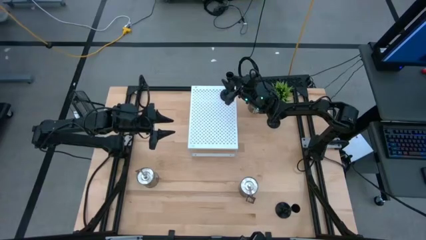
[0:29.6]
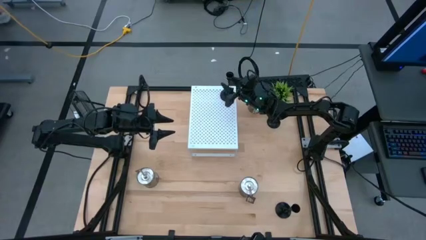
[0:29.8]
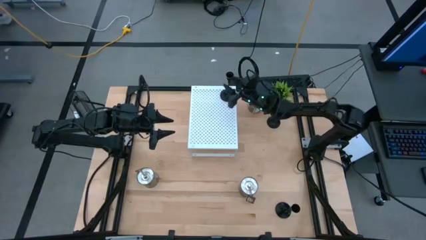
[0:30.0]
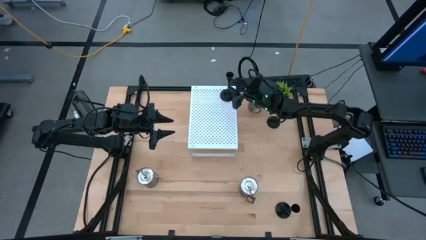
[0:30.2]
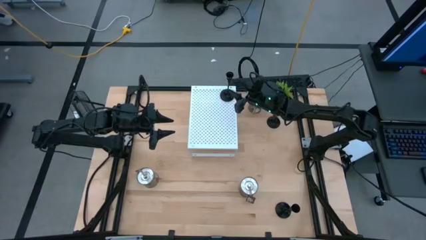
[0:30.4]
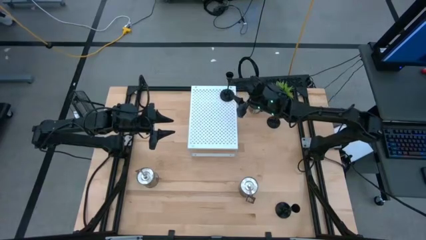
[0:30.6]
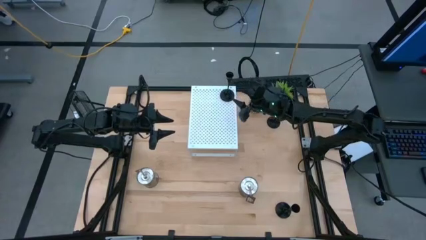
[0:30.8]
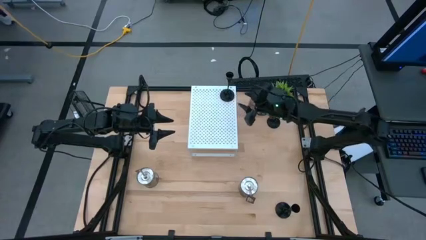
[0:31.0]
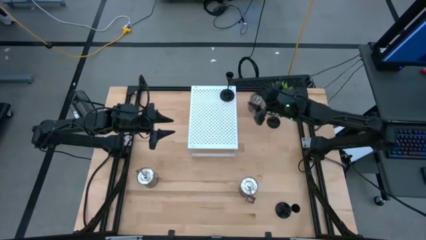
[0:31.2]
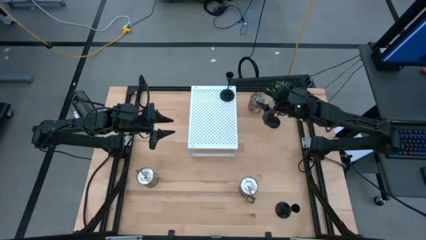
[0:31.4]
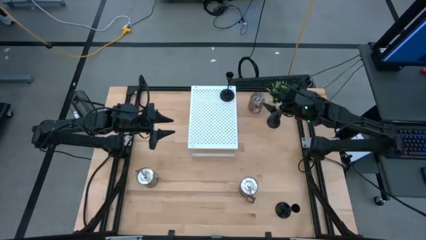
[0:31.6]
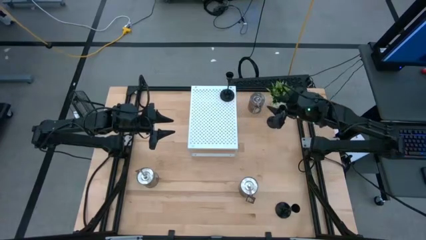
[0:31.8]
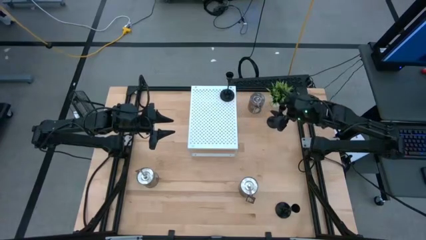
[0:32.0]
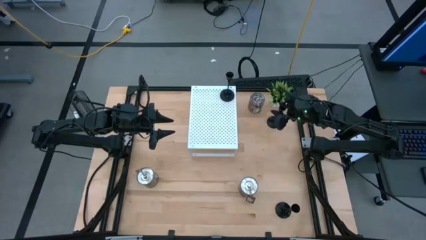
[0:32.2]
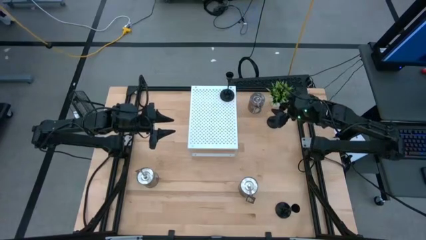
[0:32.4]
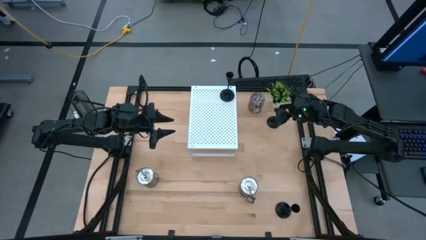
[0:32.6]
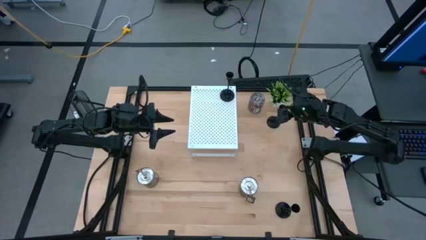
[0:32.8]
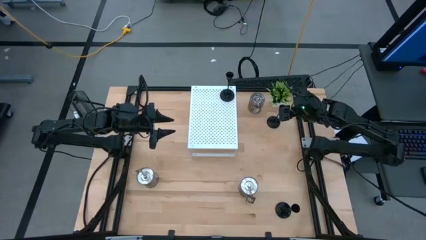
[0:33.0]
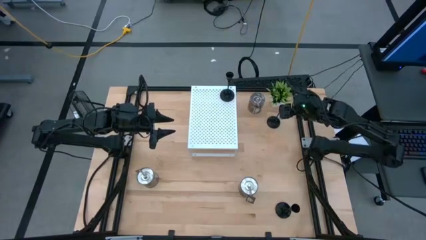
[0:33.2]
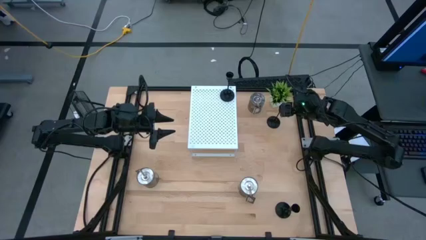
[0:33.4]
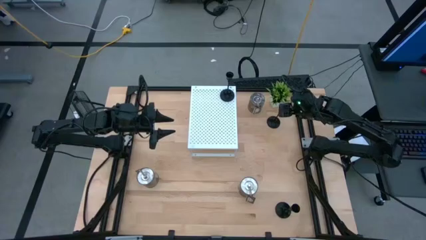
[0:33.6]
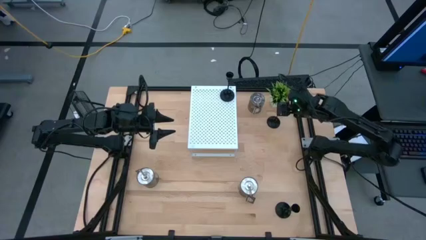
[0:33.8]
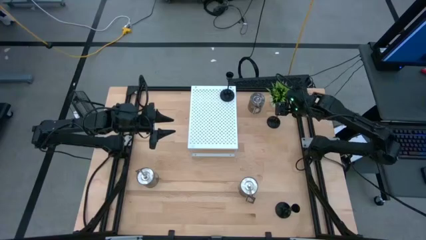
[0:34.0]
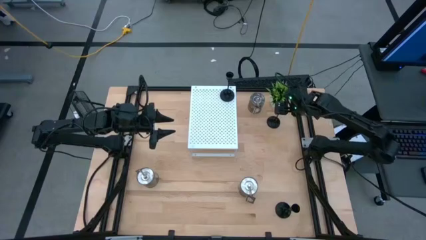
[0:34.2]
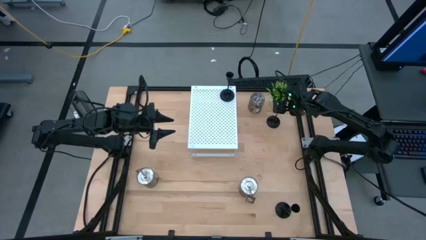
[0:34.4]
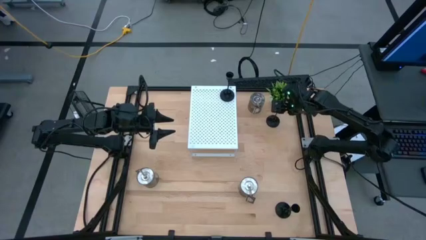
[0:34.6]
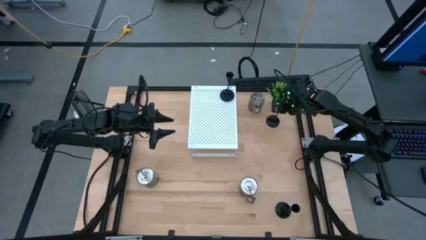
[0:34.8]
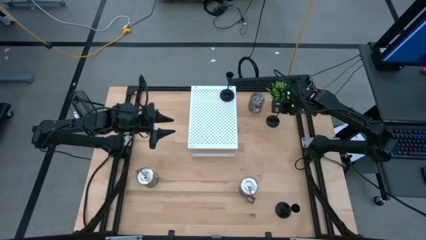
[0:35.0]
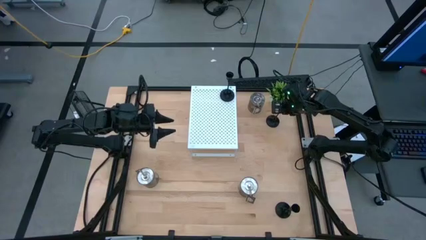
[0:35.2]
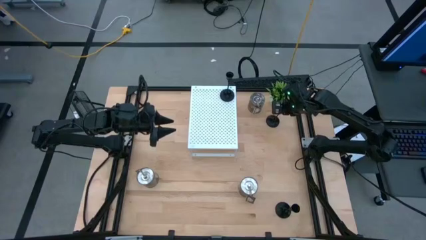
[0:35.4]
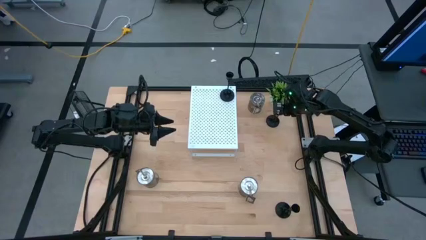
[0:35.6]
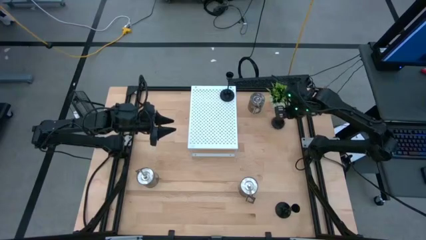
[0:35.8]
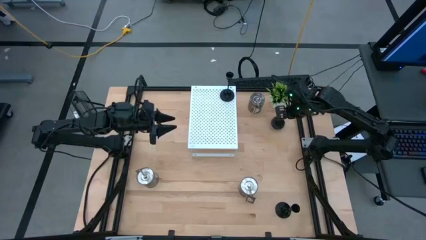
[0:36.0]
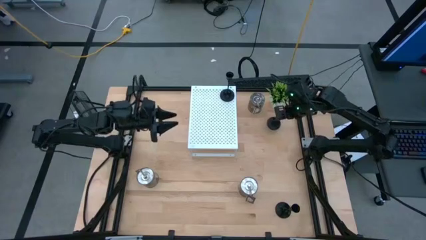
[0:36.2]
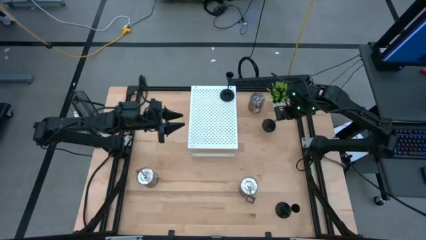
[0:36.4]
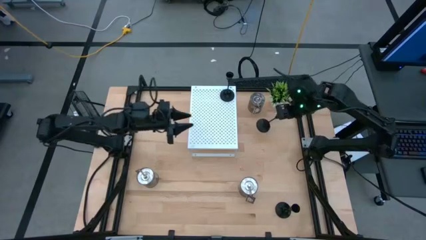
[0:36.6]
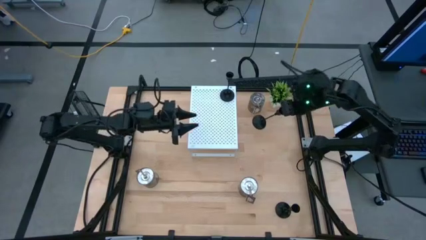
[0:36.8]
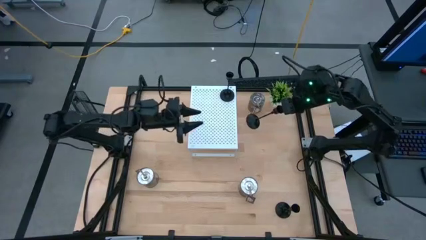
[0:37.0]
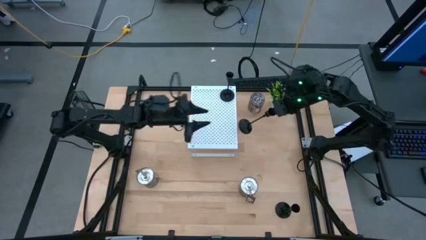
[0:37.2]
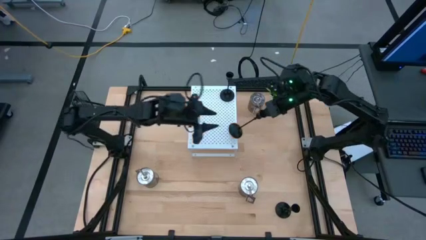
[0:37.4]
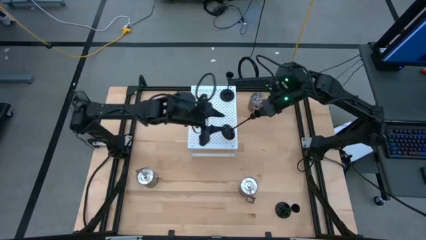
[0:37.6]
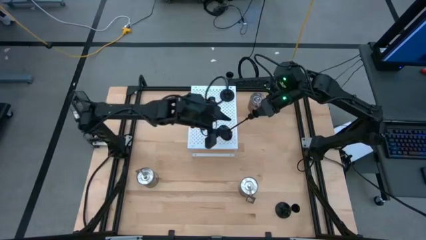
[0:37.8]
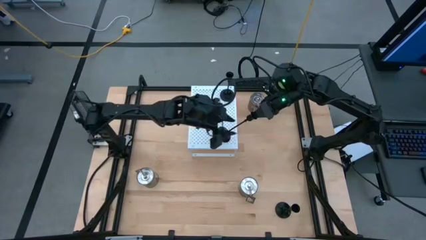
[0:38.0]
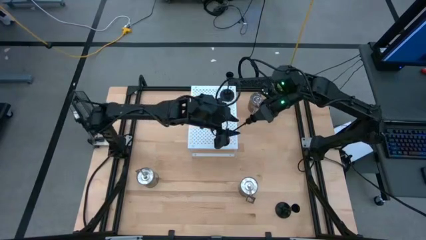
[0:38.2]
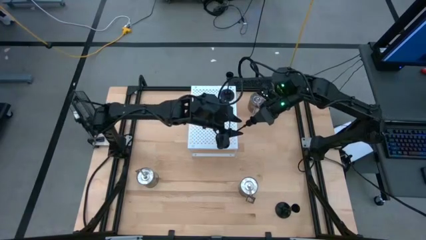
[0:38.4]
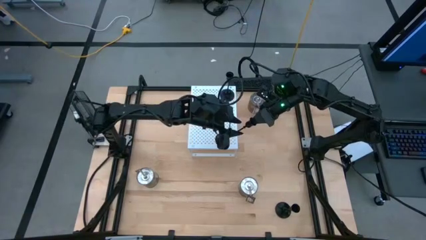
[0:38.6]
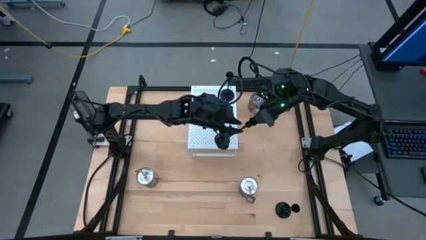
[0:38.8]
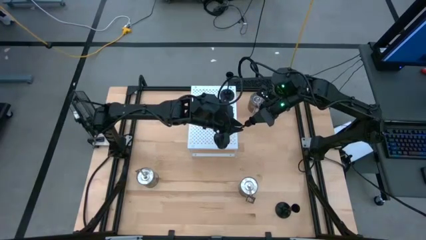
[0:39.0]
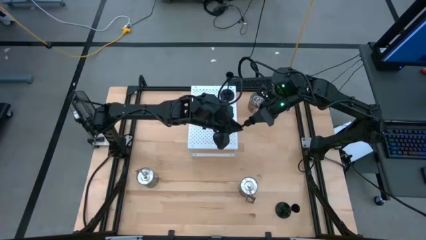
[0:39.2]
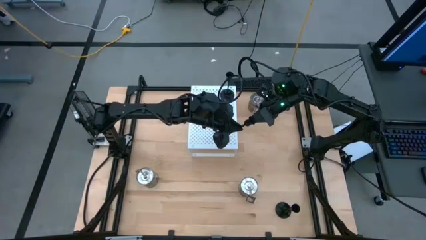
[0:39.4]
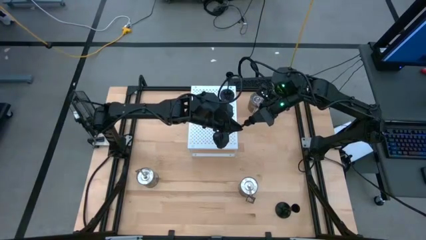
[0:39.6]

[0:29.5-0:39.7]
Task: Pick & Place candle stick holders
Put the top black candle holder on the shelf aligned with the other black candle holder

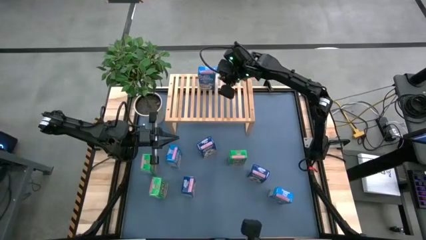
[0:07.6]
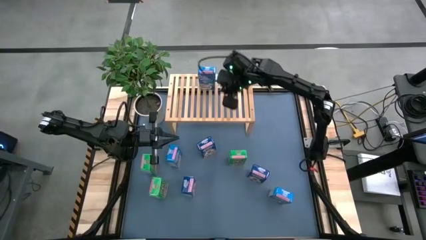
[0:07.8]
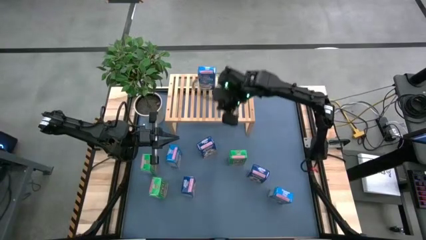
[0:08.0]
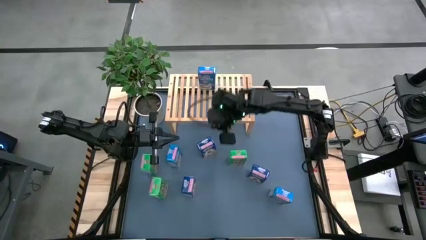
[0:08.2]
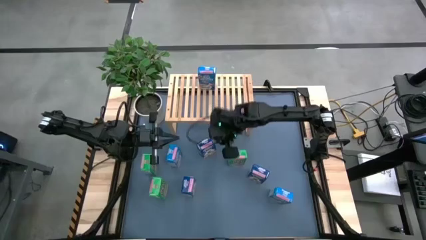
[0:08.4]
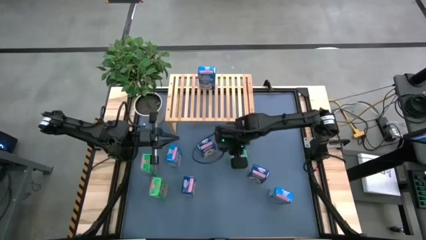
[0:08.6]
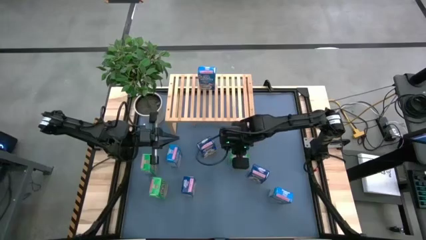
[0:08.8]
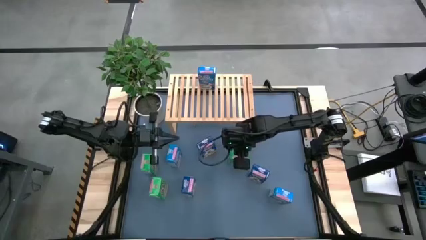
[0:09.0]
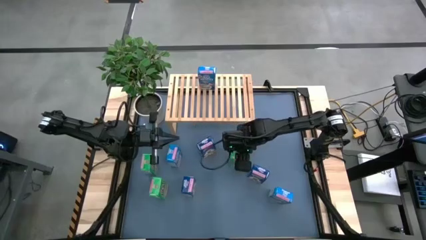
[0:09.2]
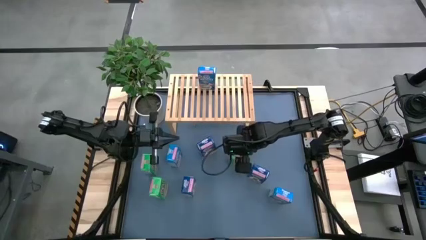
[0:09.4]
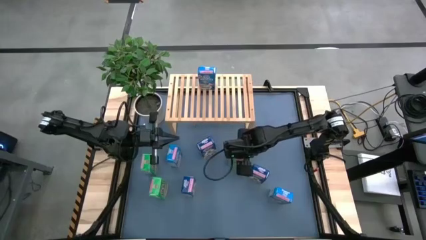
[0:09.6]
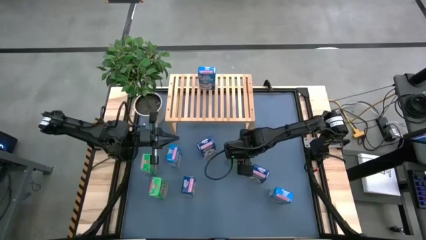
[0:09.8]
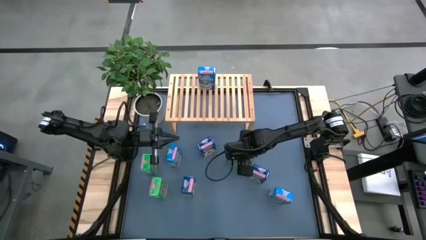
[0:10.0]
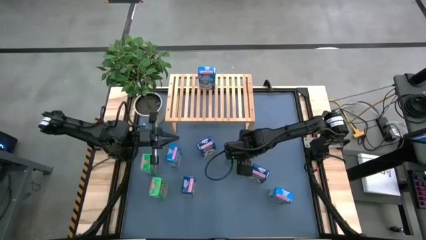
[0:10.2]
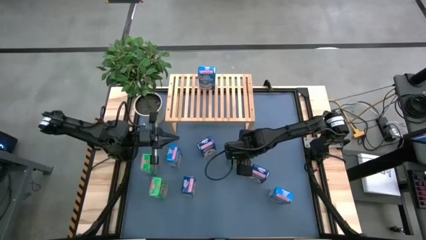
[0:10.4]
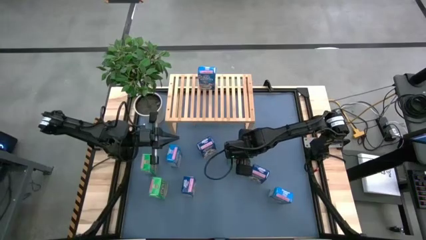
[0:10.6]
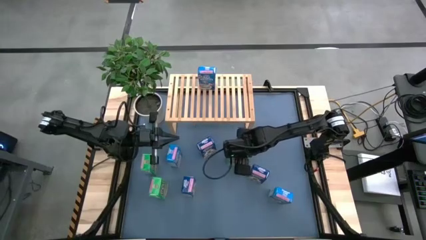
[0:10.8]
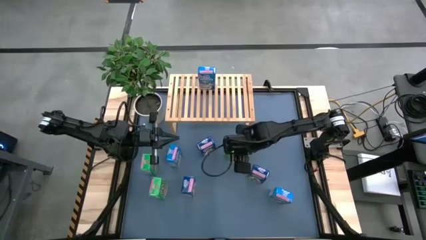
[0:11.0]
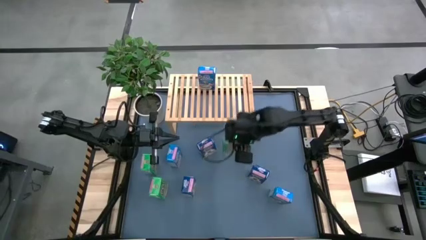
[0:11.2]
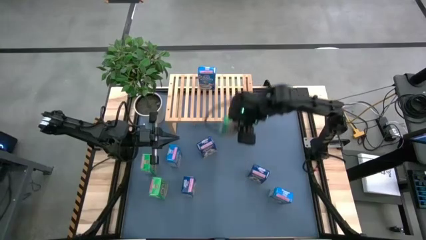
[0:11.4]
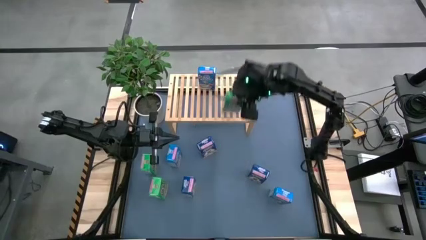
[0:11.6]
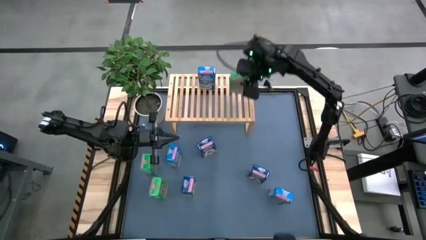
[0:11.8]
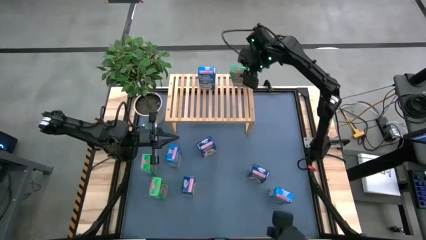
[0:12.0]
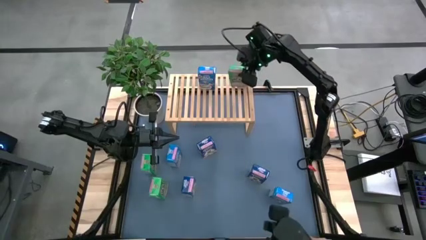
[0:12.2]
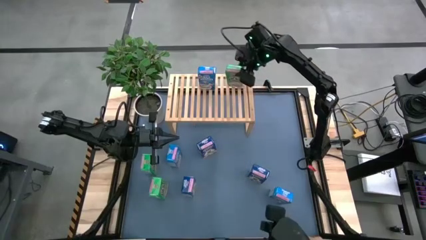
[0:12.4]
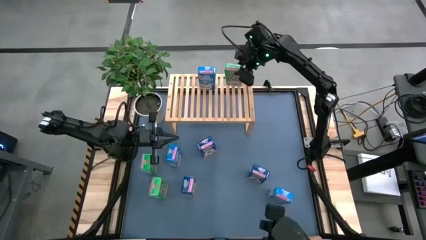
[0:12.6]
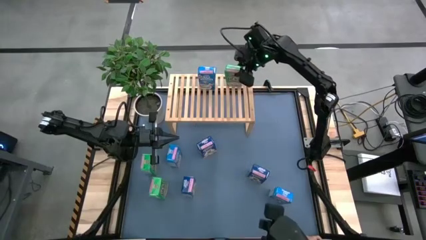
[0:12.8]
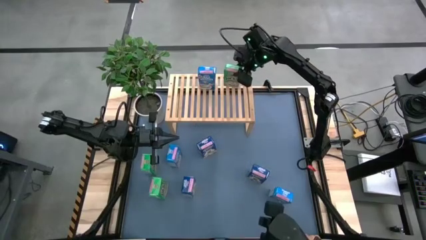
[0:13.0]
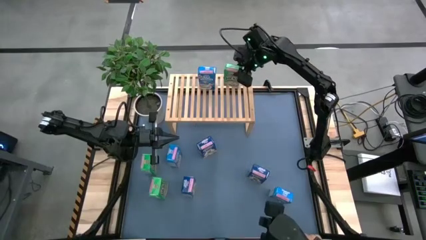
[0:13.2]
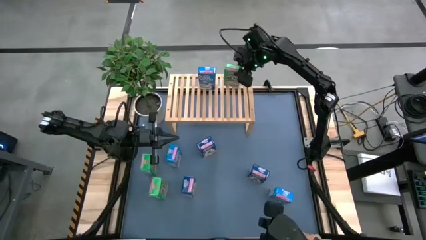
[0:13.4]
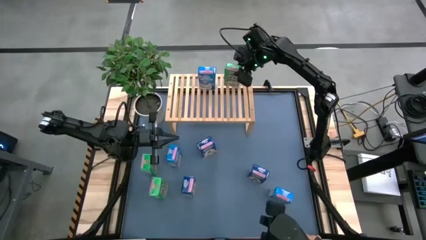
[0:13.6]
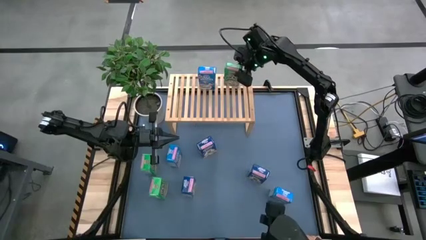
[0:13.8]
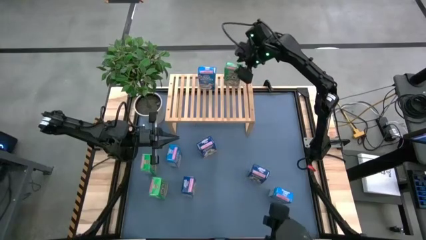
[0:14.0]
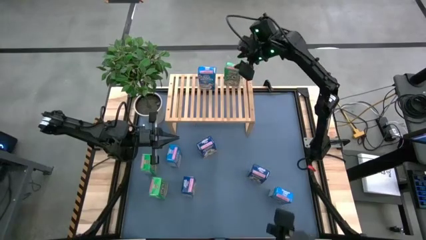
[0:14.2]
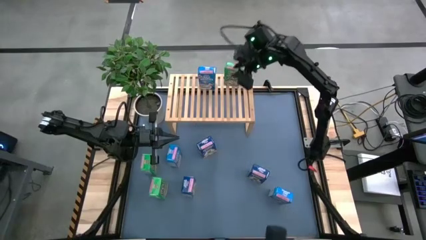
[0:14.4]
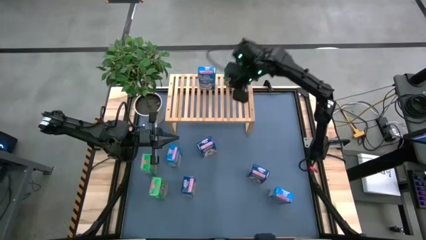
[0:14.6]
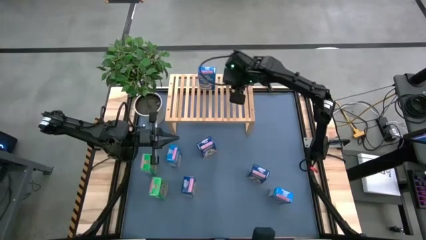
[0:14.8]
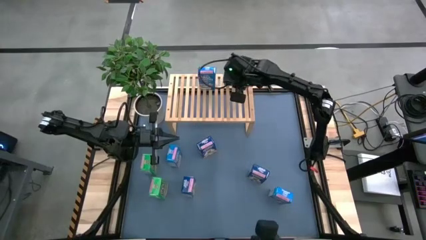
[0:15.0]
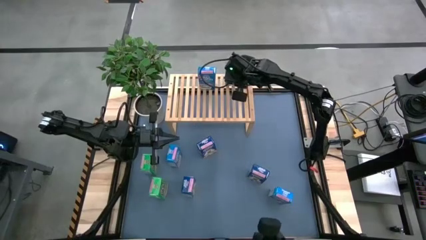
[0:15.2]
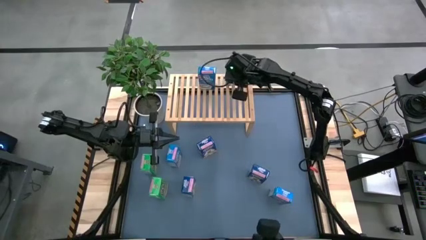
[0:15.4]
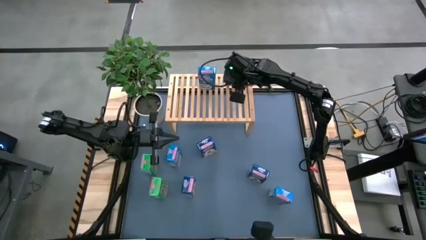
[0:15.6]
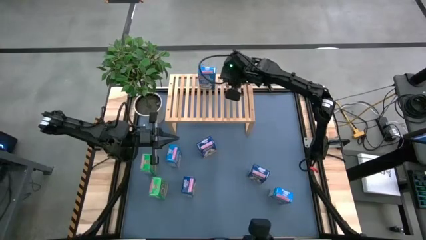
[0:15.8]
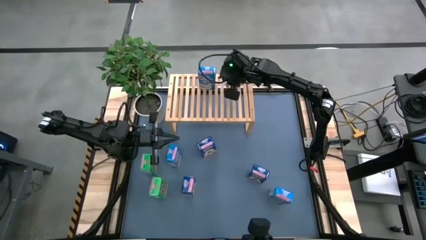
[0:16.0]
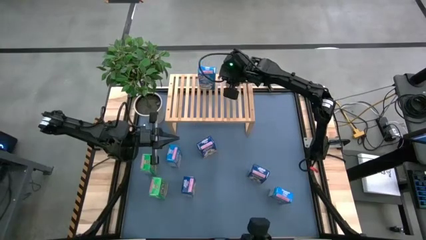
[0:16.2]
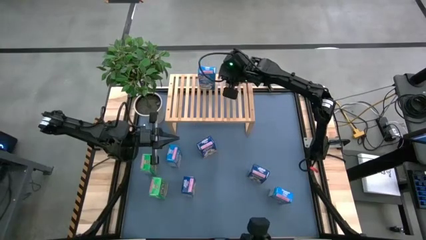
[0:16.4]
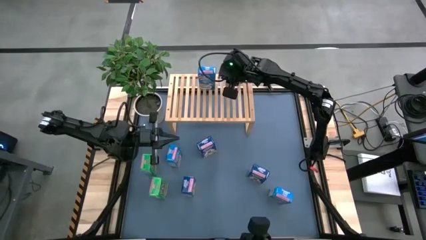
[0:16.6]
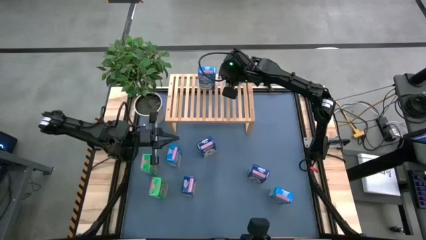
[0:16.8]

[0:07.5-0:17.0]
Task: Stack cereal on shelf
Put the right green cereal box on the shelf
